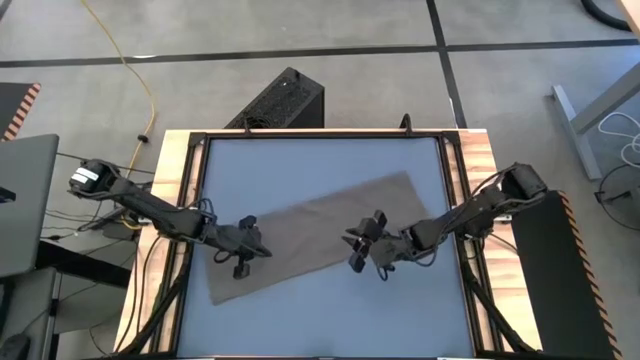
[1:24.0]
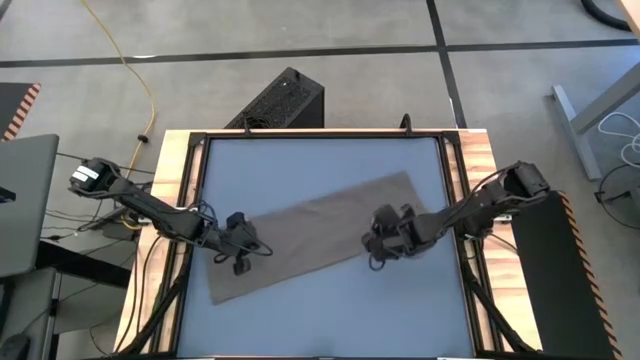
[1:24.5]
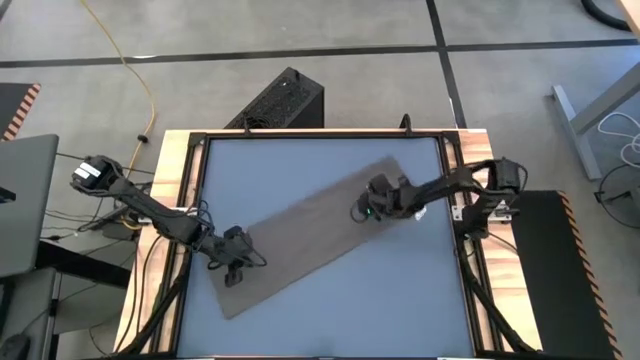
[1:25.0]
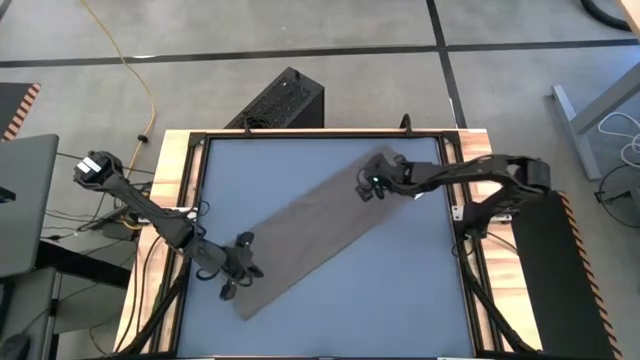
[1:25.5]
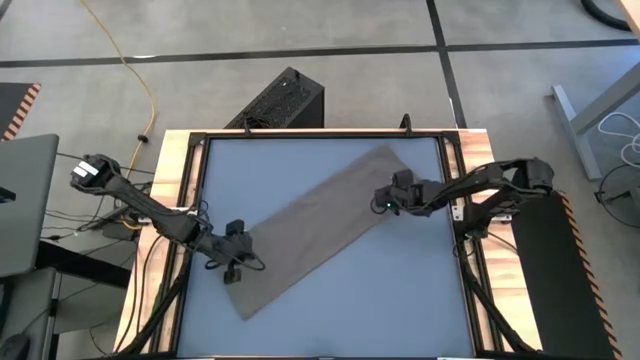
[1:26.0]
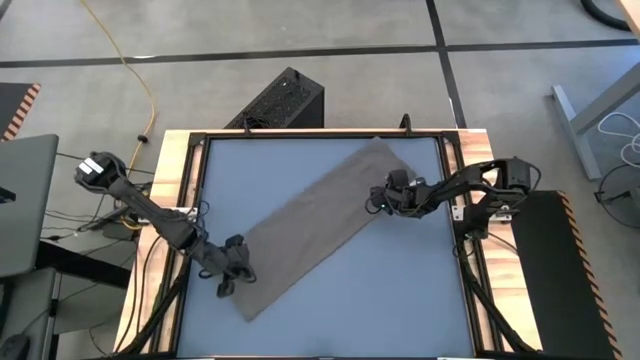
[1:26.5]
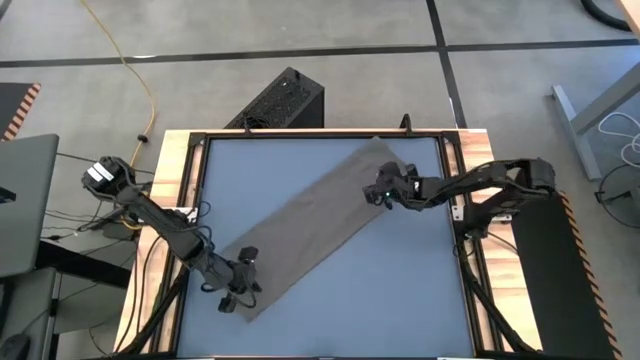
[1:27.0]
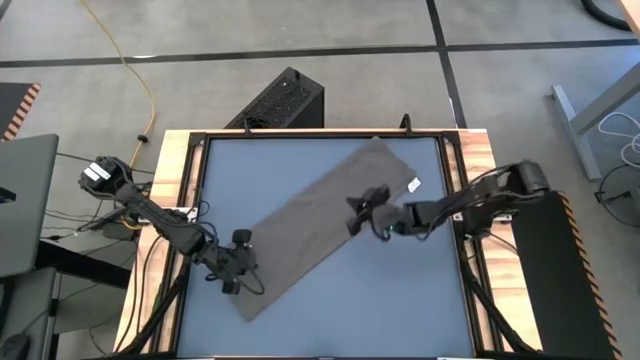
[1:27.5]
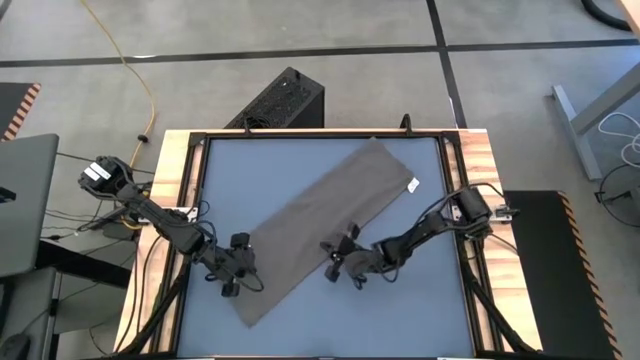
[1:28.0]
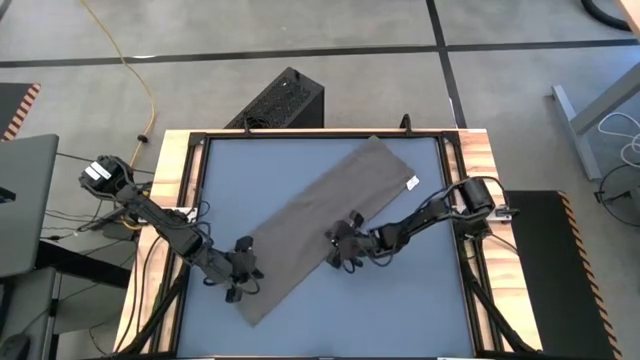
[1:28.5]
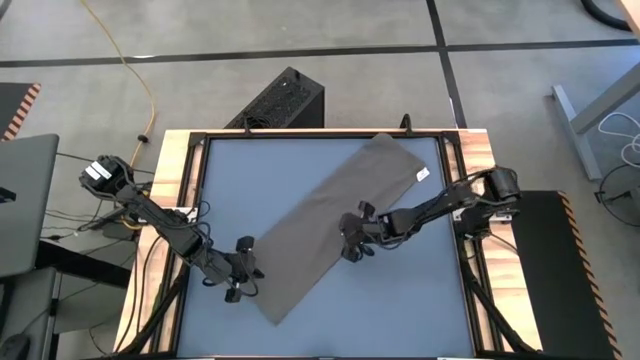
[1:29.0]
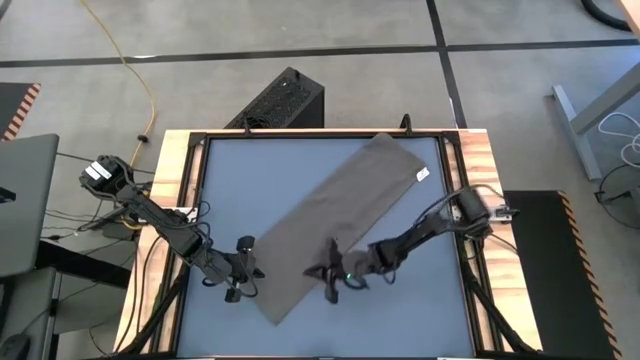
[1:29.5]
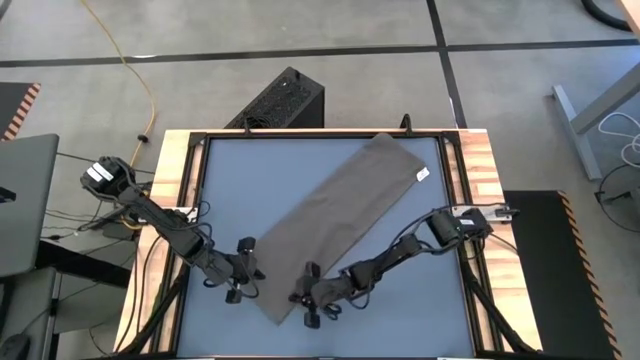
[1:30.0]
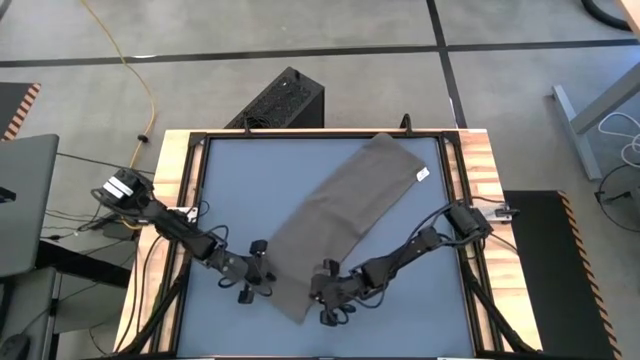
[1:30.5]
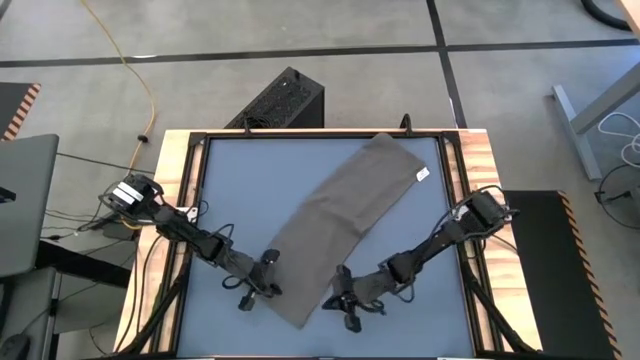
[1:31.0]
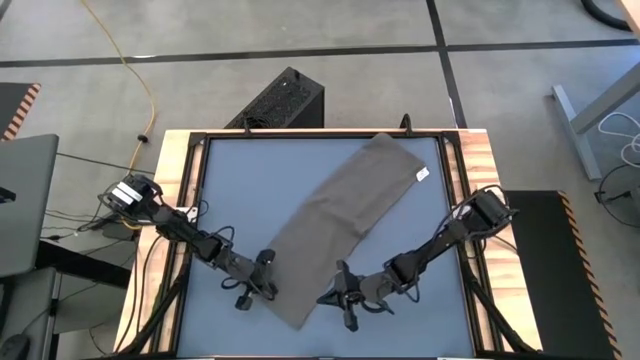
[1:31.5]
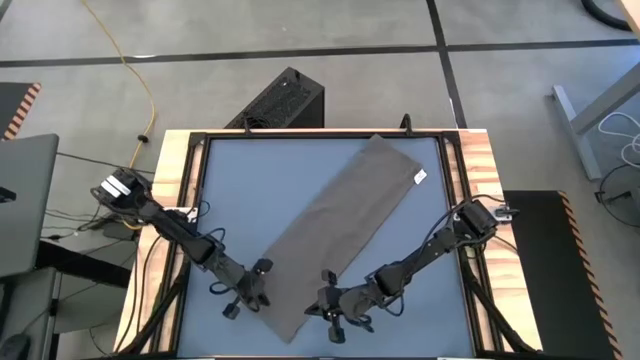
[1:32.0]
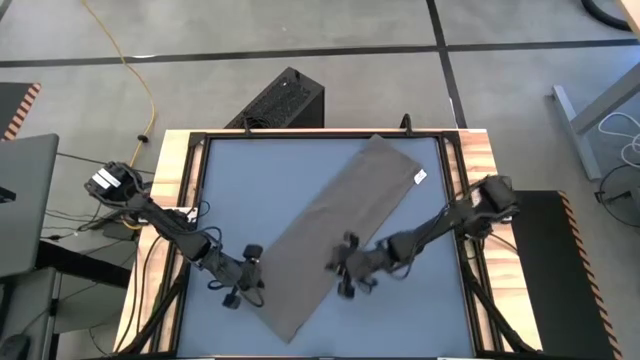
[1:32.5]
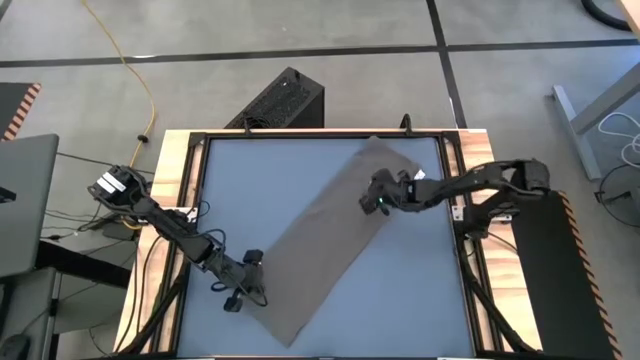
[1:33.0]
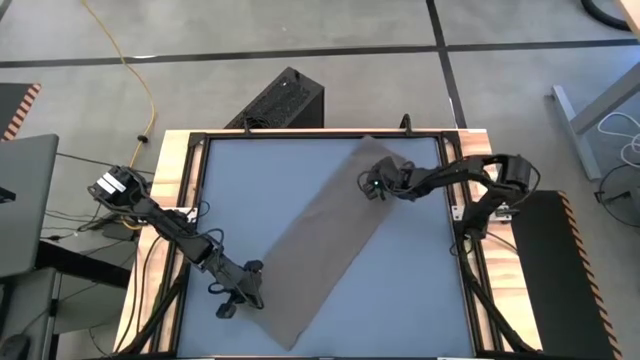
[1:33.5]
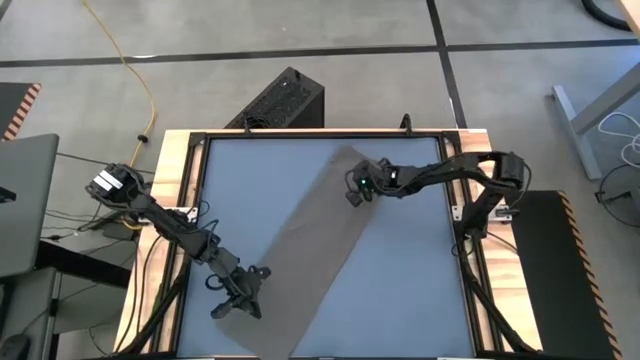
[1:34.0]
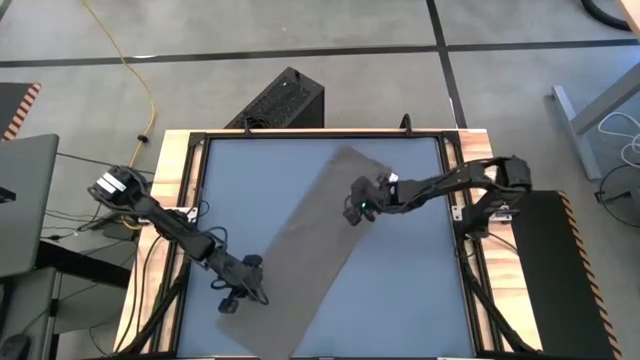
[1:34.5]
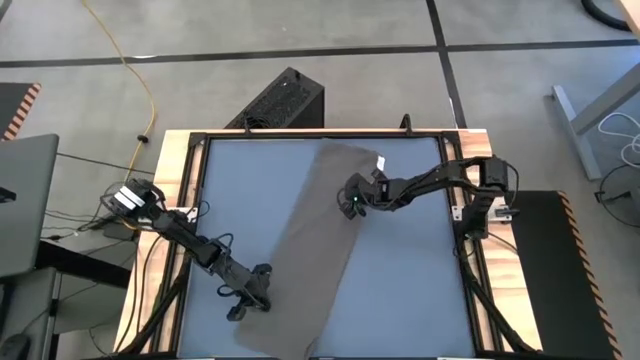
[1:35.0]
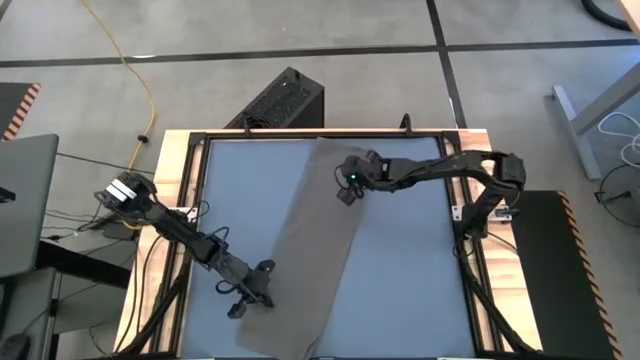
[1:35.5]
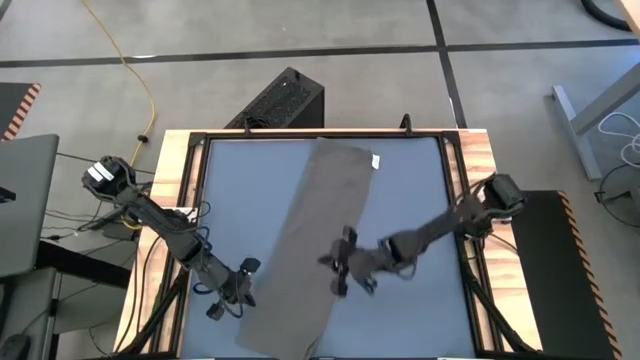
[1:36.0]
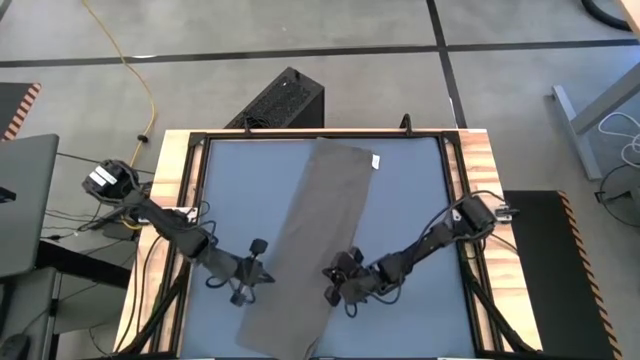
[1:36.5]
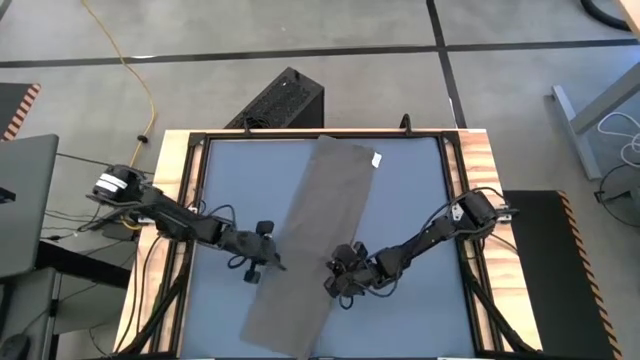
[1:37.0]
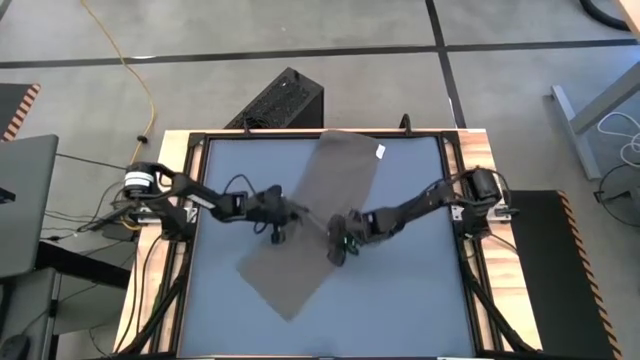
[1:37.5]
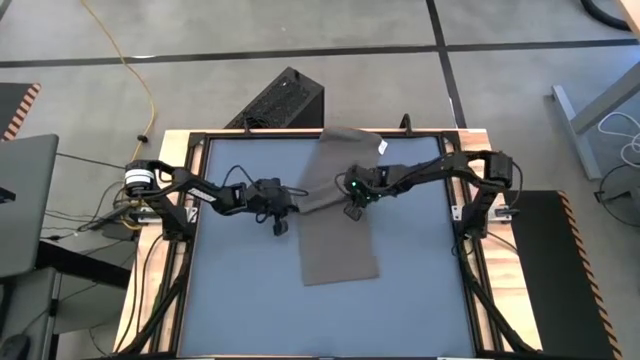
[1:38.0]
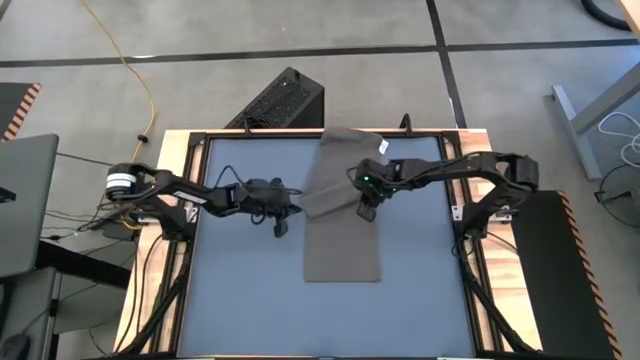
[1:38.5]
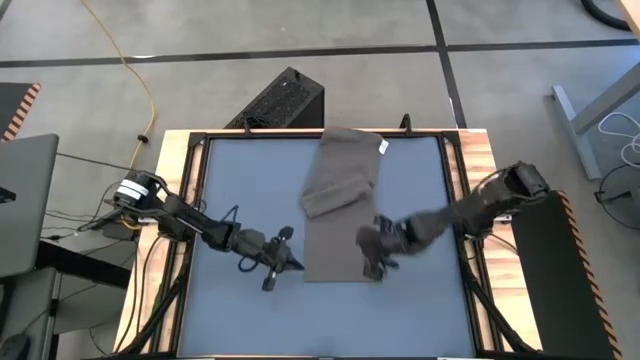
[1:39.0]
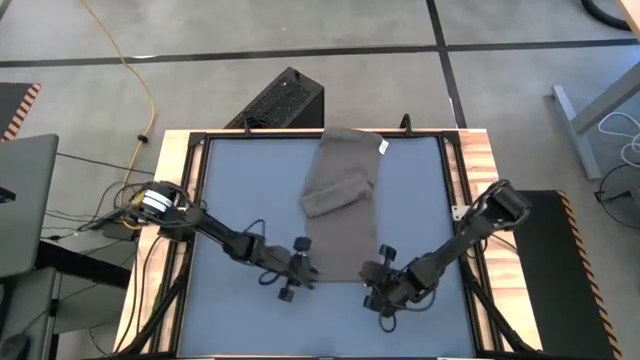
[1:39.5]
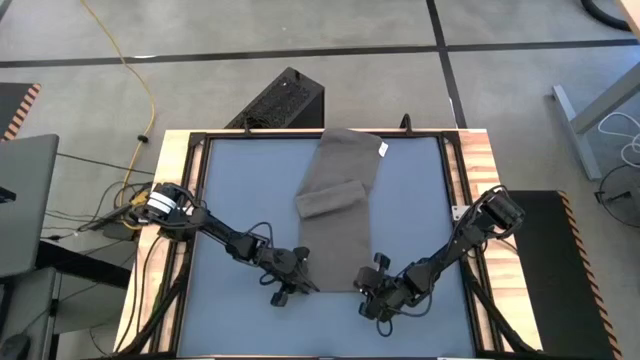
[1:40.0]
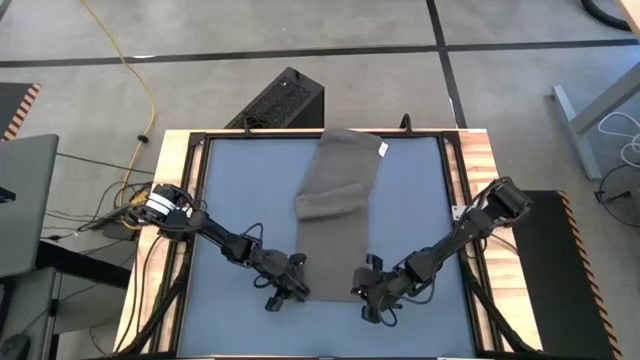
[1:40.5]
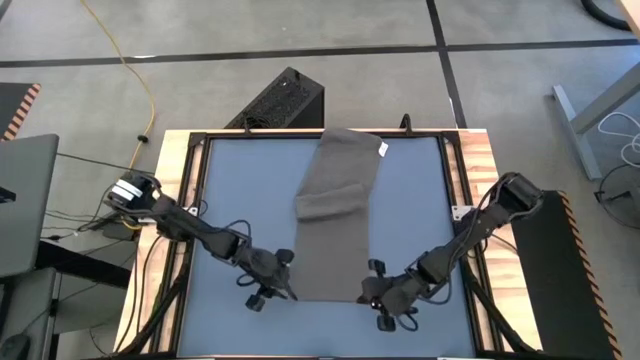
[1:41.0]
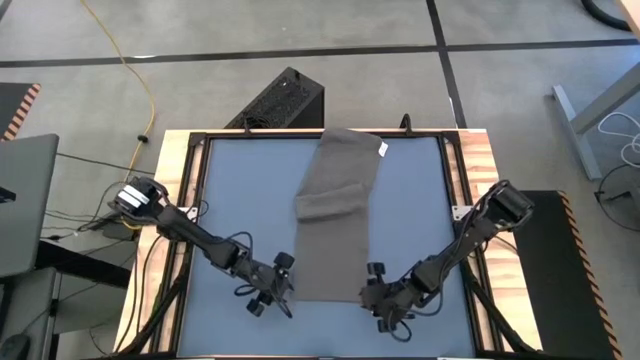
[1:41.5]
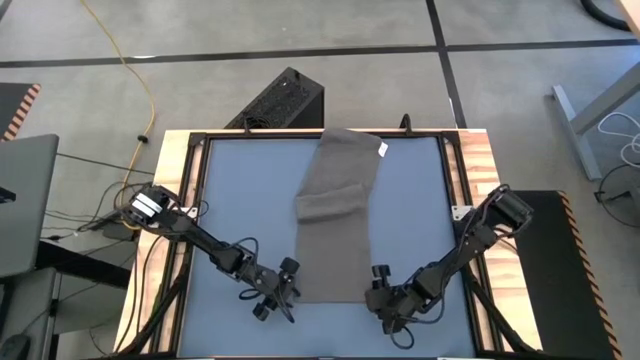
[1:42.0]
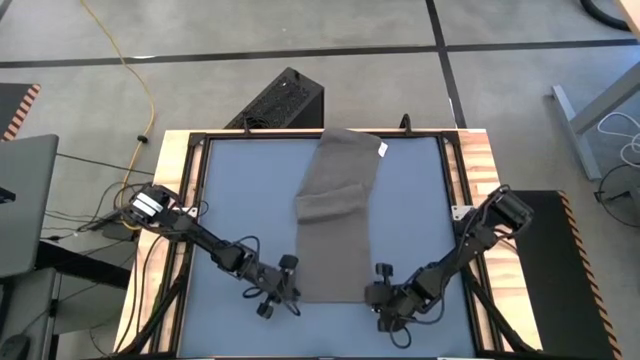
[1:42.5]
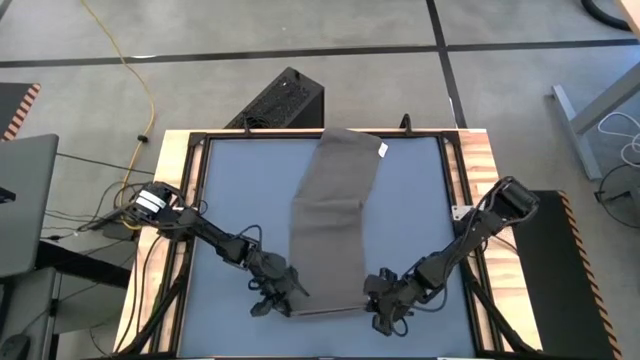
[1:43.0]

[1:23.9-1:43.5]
Task: Roll towel
Roll the gray towel

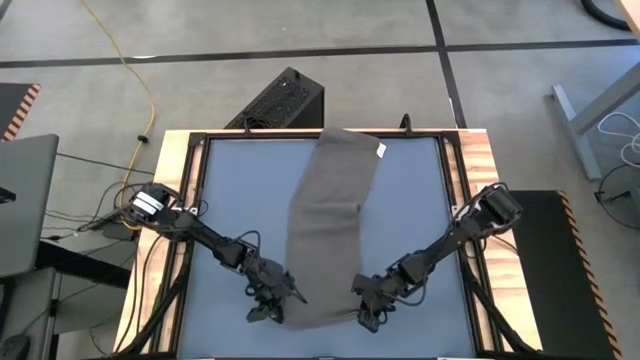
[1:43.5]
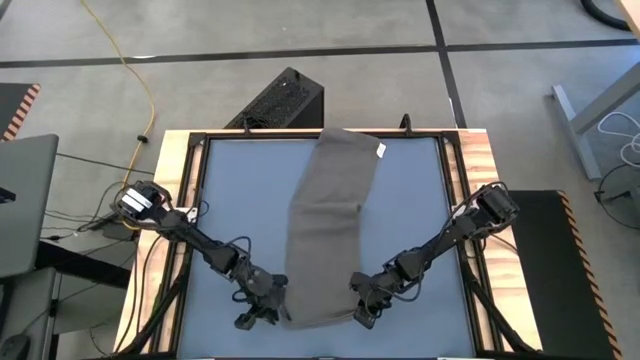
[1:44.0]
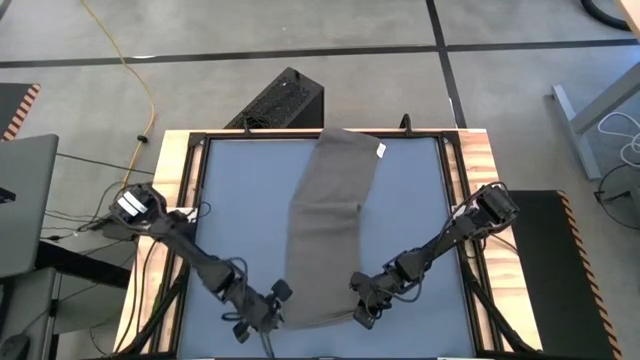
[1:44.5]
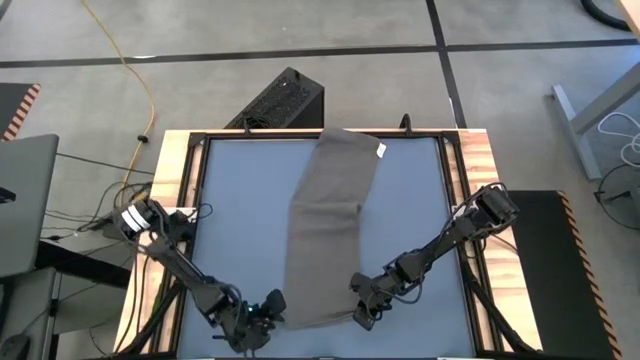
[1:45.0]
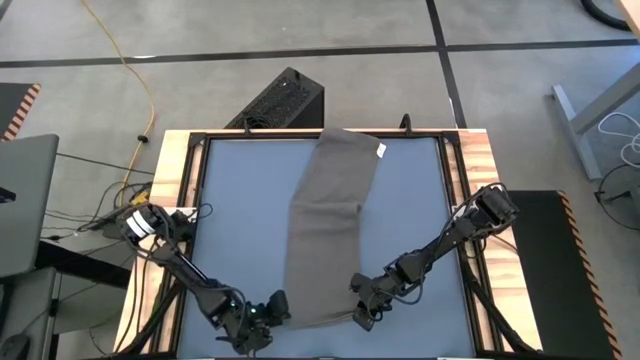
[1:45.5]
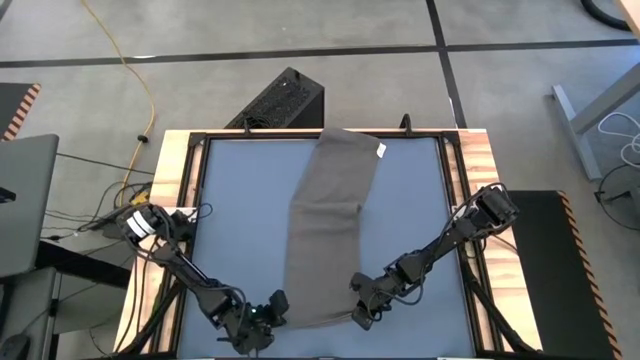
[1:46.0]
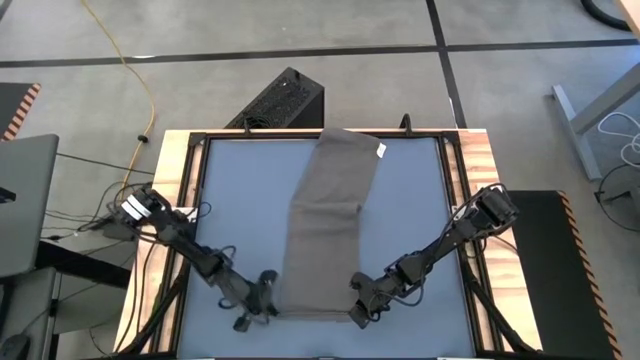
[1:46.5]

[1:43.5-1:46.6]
Roll the gray towel
